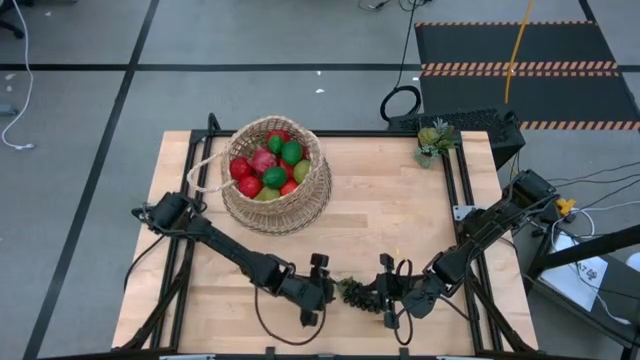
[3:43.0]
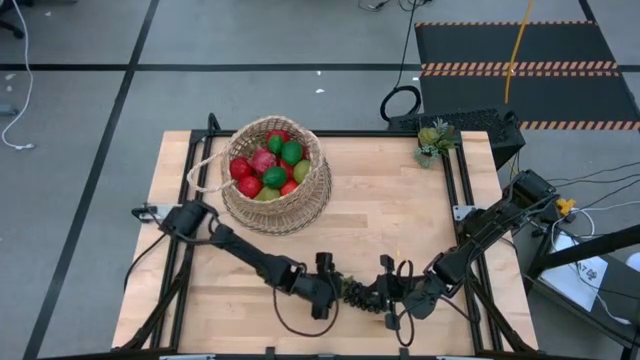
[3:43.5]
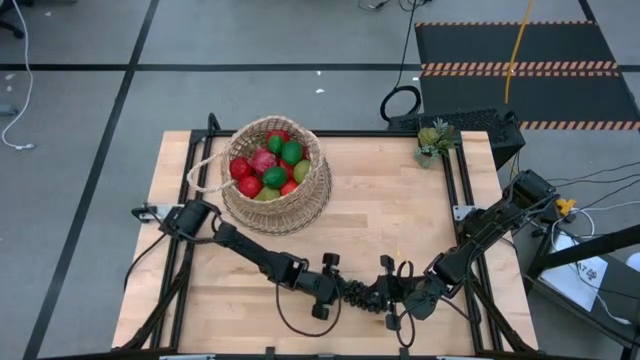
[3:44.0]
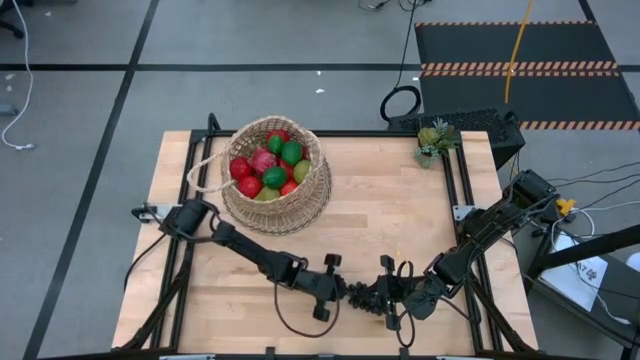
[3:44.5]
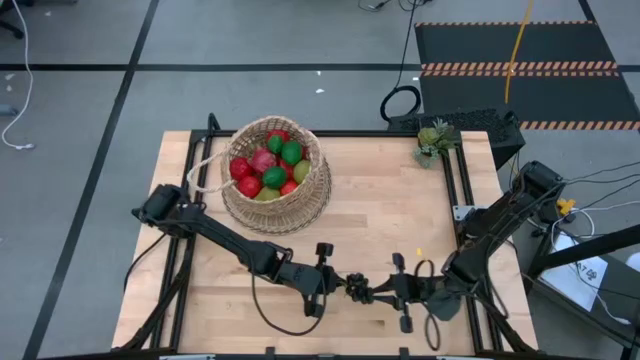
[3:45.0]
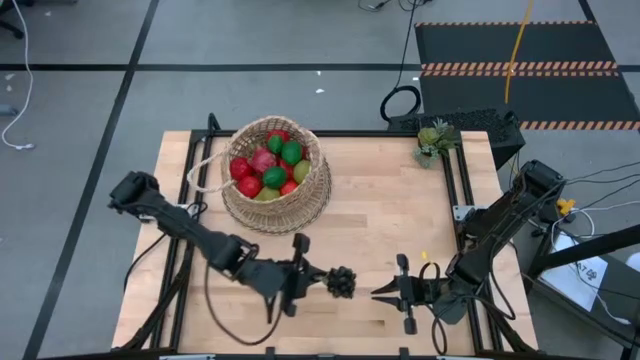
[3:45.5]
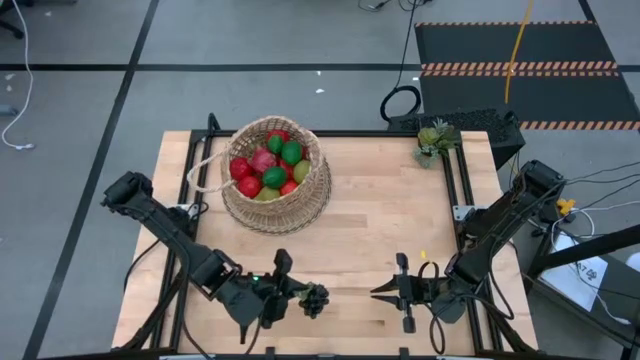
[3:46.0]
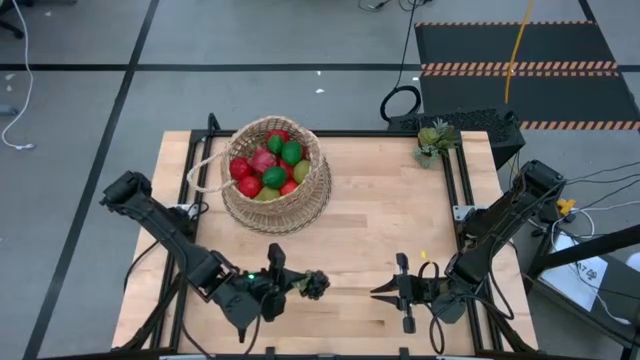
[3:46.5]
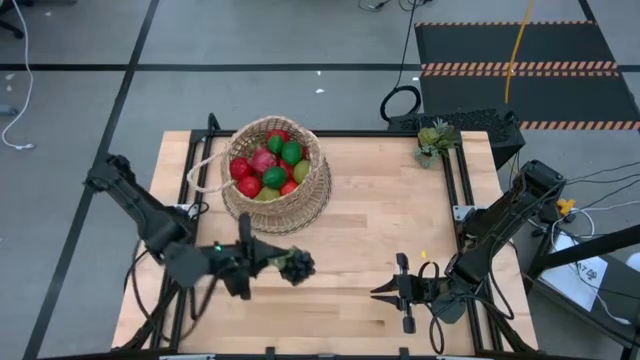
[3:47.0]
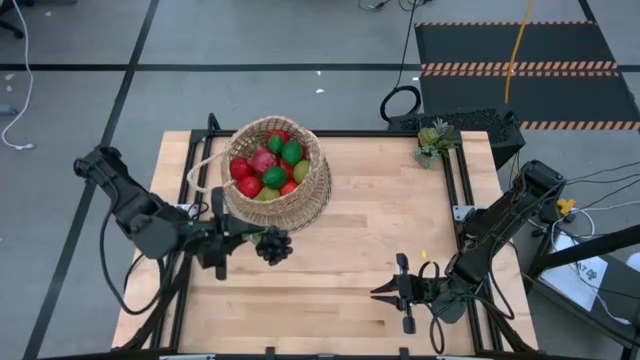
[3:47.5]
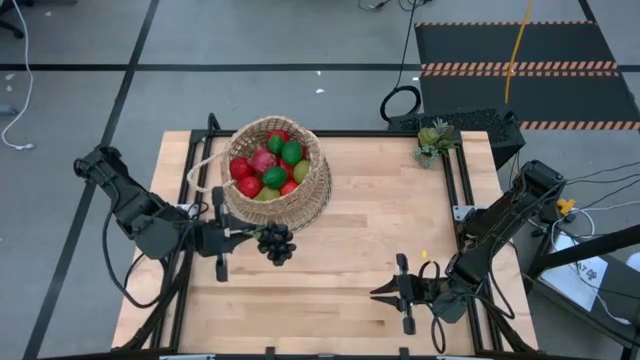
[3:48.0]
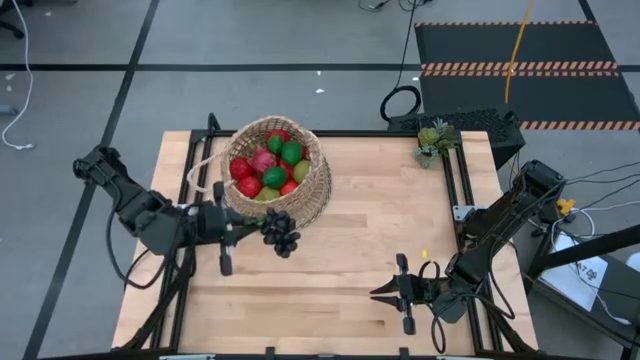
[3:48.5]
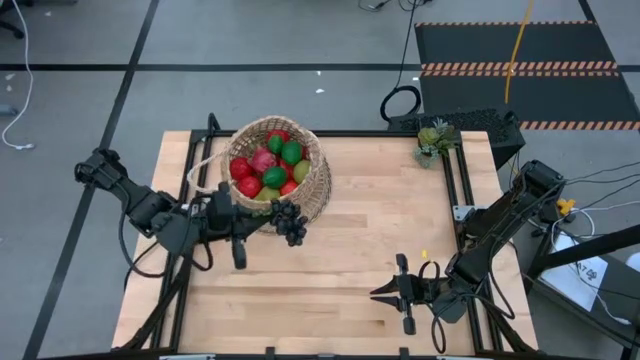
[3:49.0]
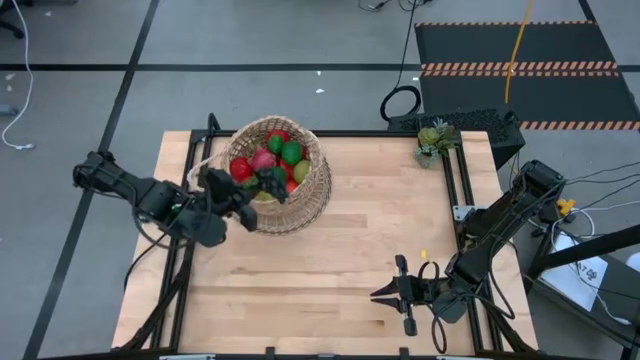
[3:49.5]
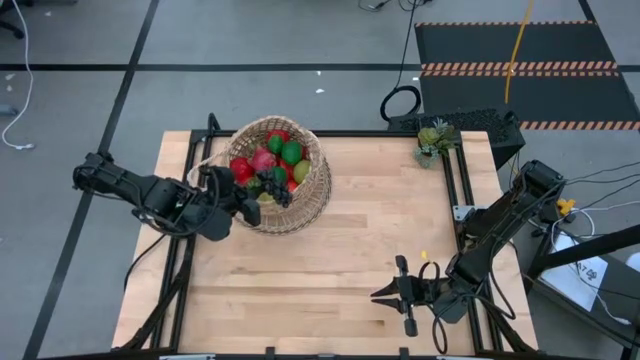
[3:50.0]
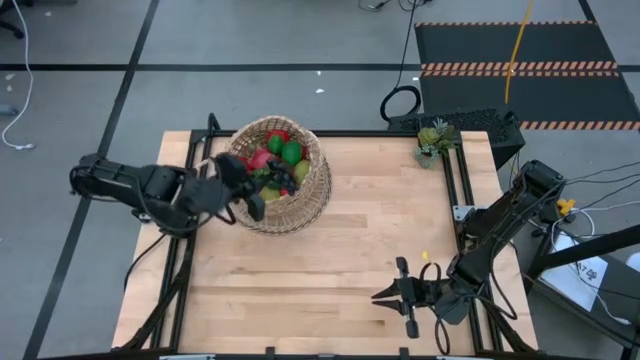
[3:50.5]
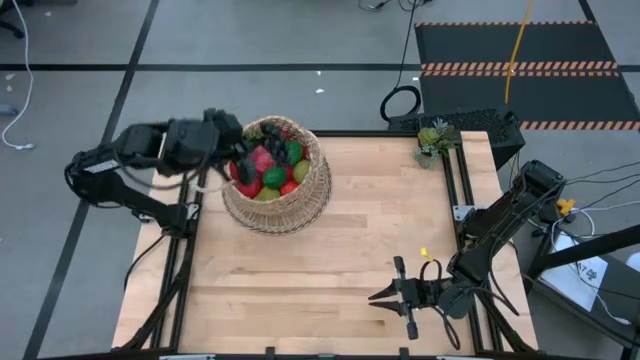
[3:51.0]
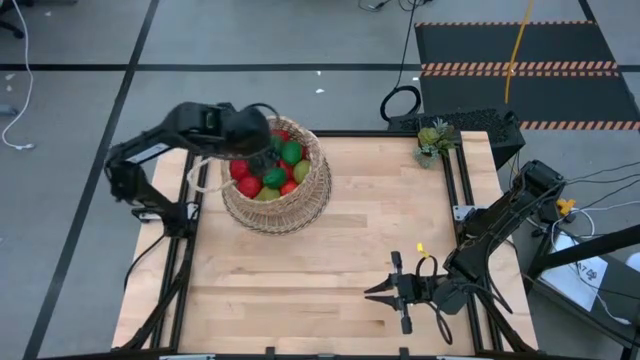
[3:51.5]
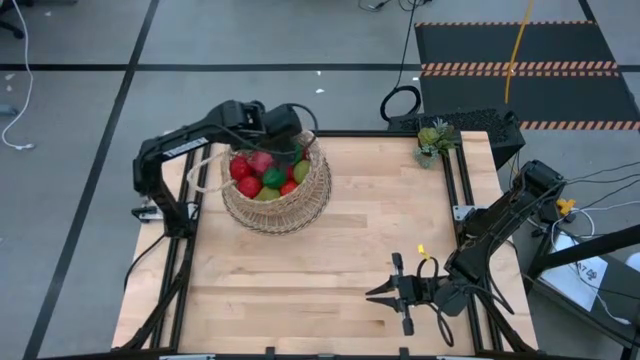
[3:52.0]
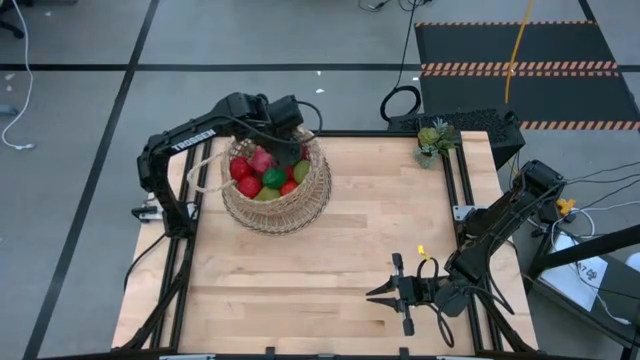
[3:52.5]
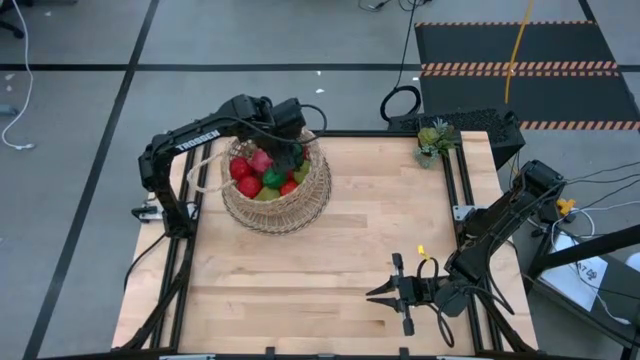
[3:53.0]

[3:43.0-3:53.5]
Task: Build produce basket
Put the grapes into the basket

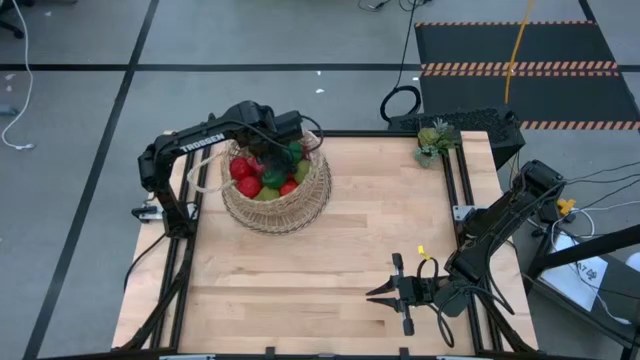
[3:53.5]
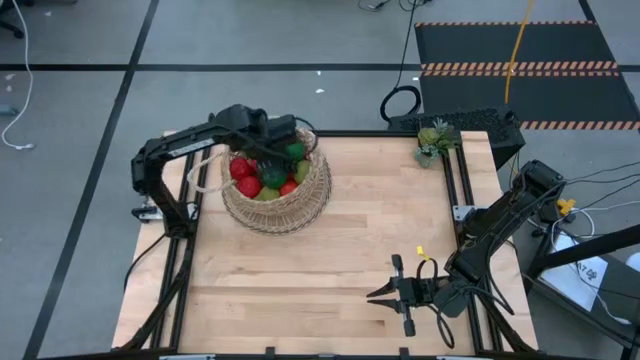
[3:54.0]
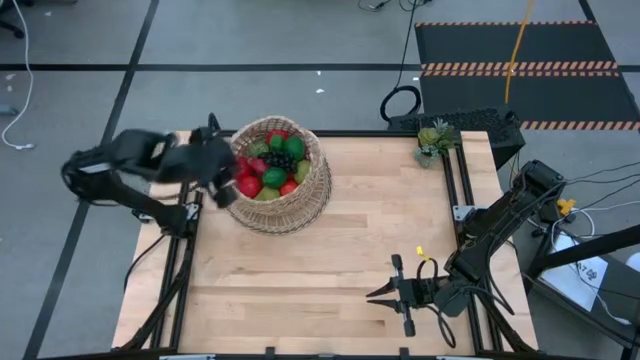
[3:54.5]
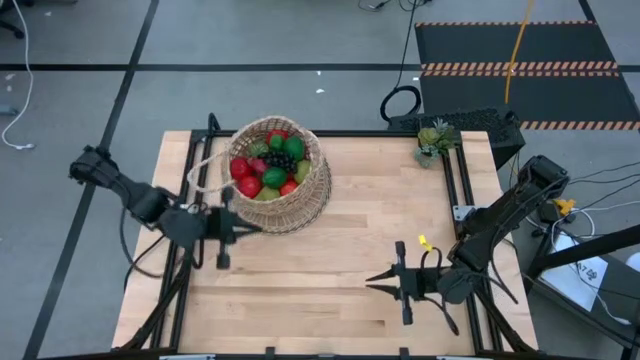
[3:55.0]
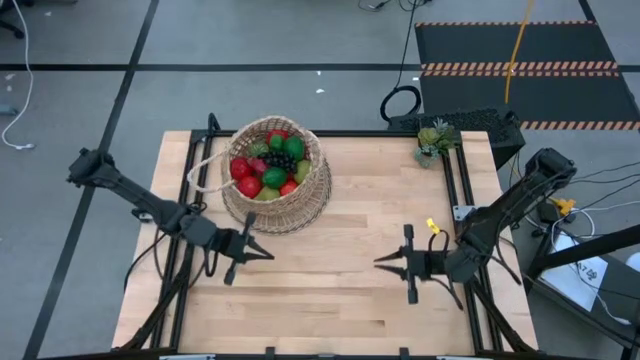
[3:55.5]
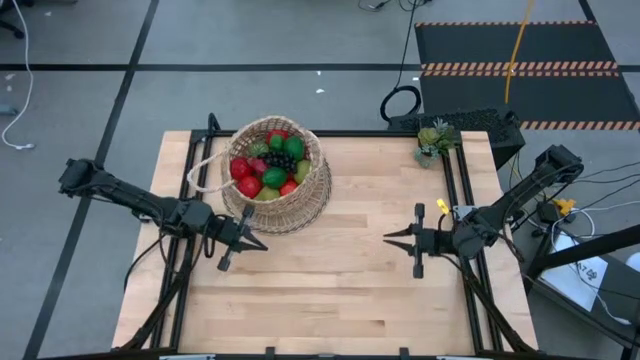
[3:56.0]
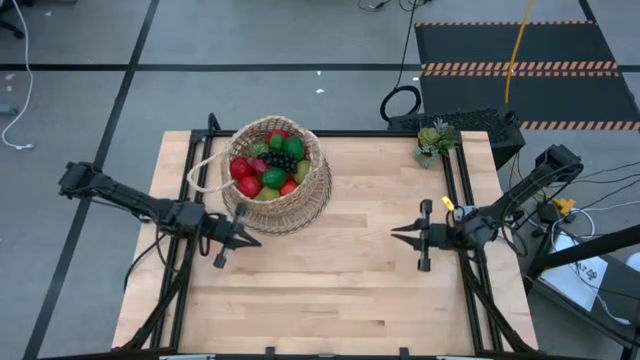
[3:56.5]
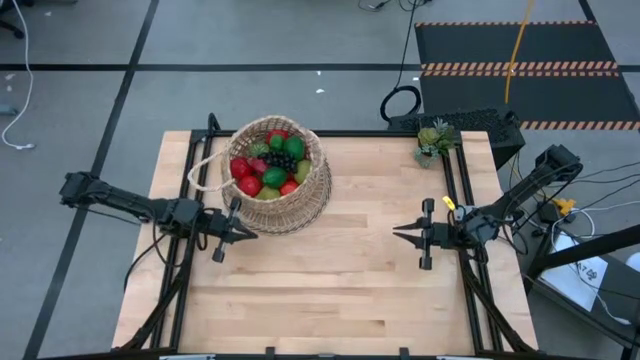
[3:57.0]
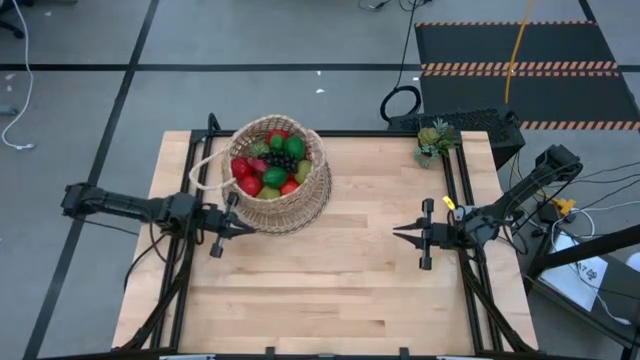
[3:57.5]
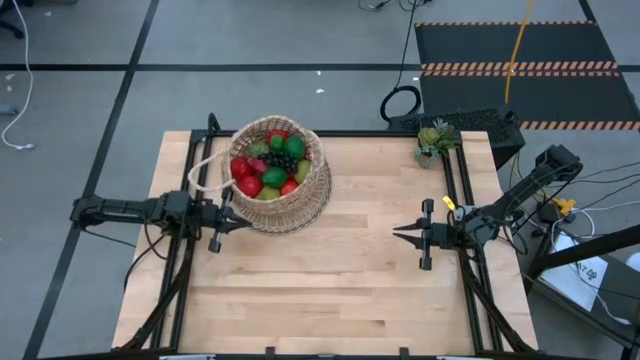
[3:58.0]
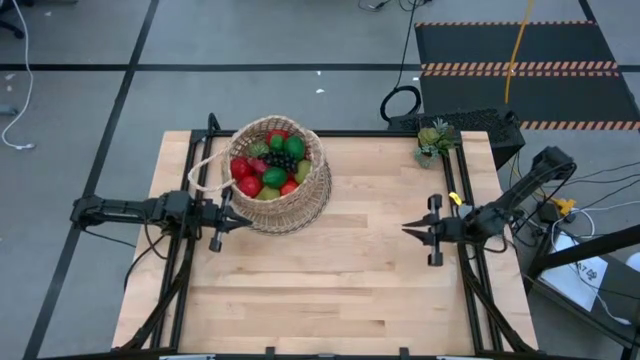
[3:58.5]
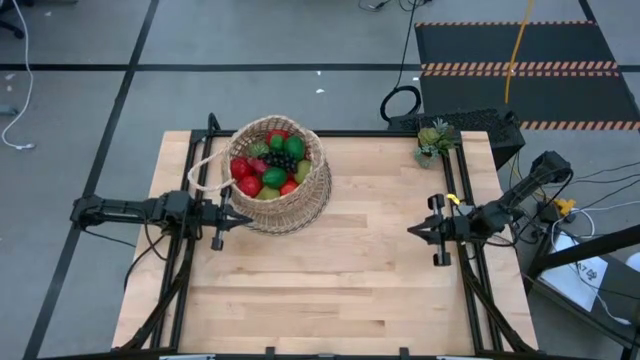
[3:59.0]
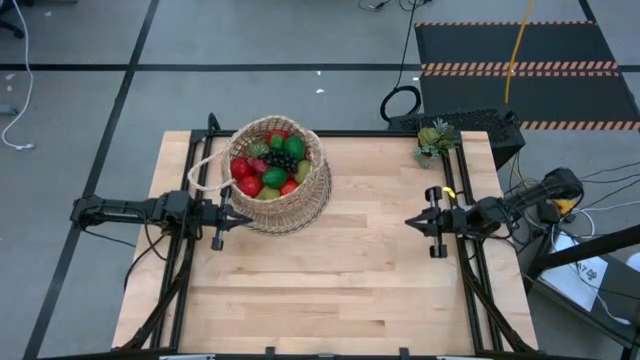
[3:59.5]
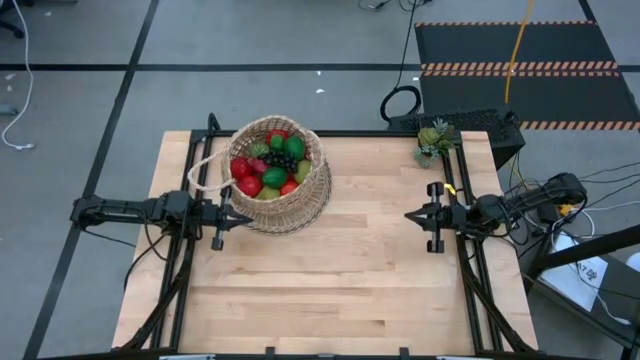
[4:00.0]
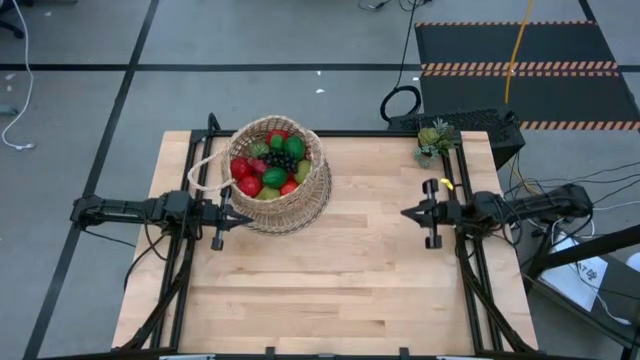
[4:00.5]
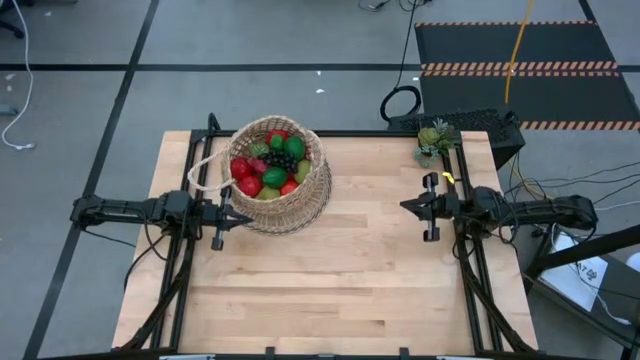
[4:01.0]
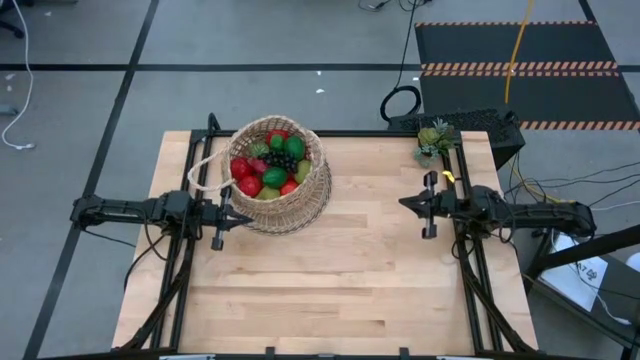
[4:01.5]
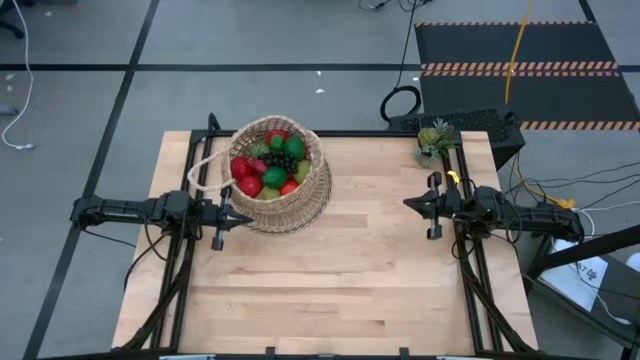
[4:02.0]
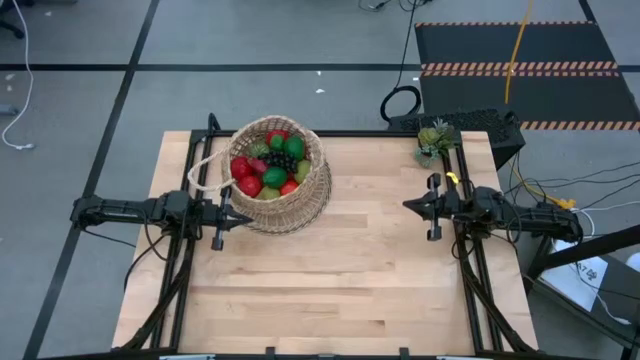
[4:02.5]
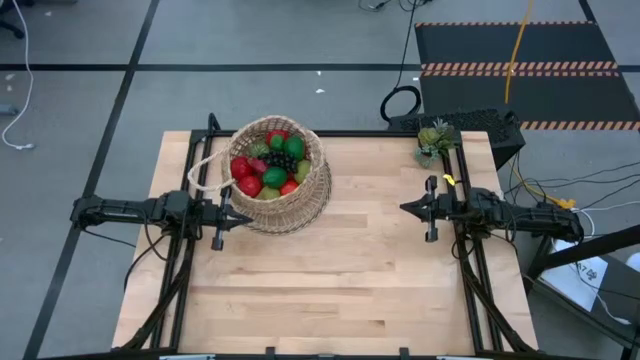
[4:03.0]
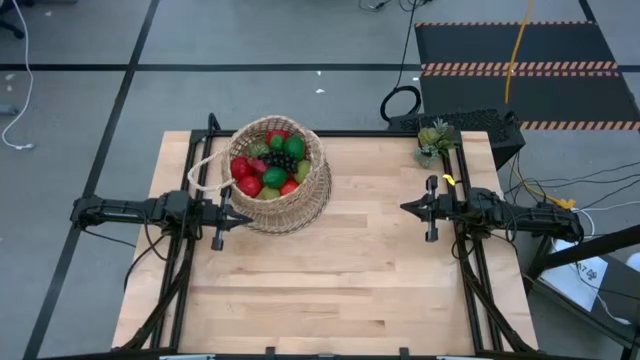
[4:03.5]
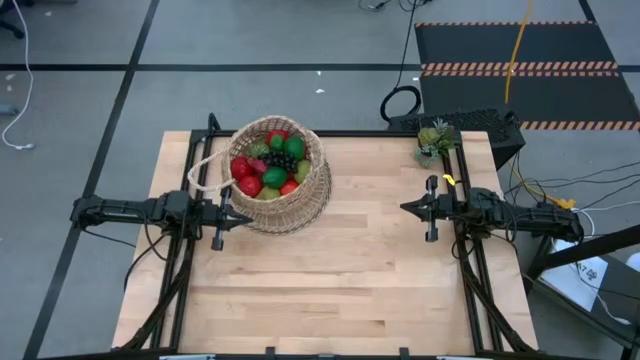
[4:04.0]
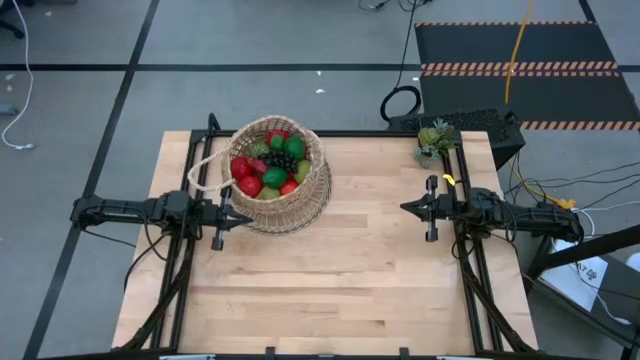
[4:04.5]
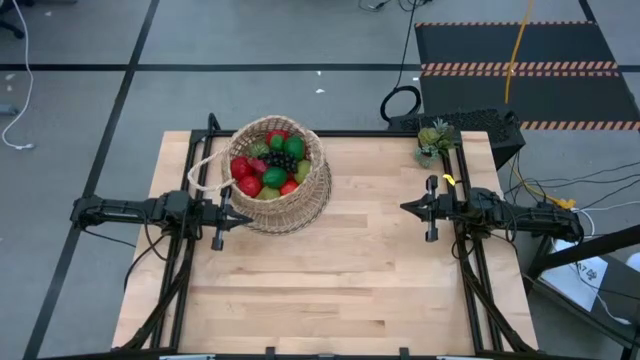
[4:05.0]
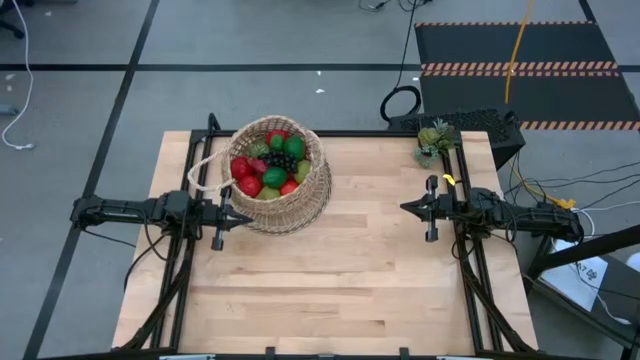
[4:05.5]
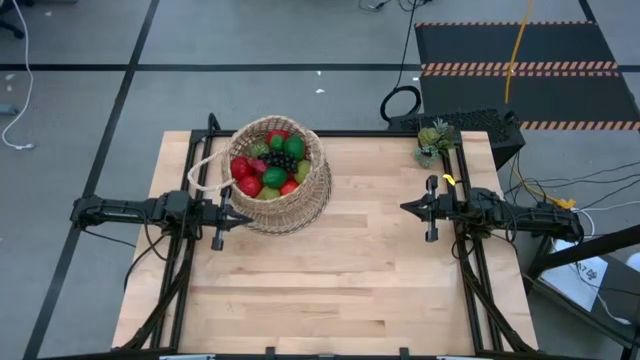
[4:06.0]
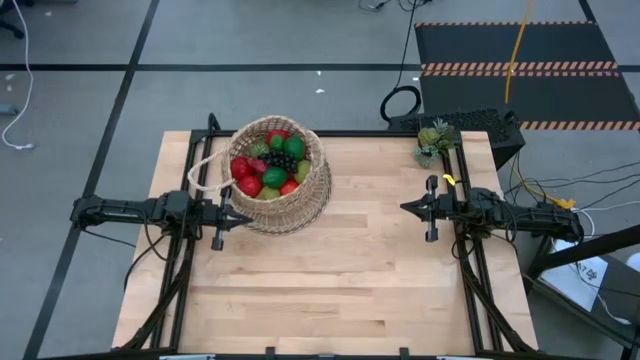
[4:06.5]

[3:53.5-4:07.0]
Return to Home Position
